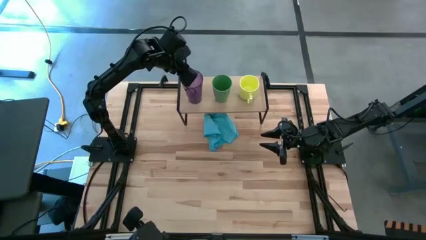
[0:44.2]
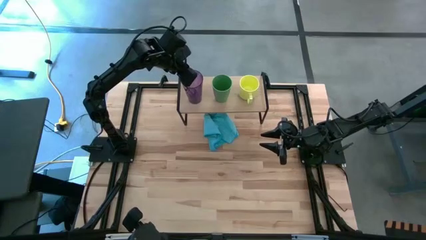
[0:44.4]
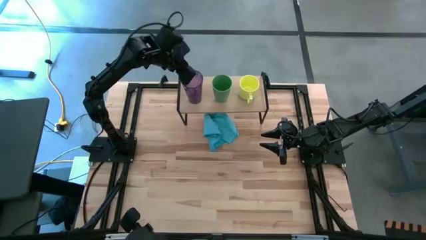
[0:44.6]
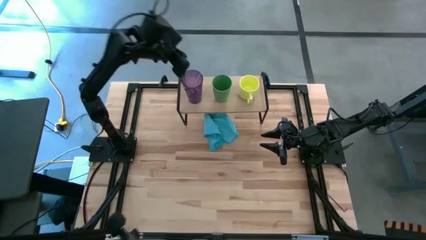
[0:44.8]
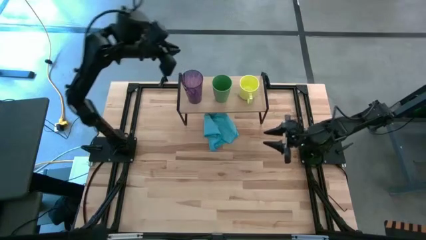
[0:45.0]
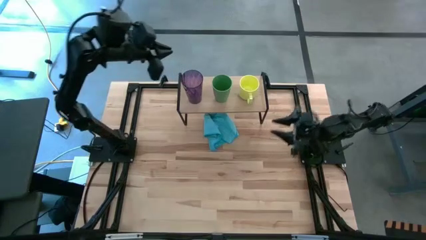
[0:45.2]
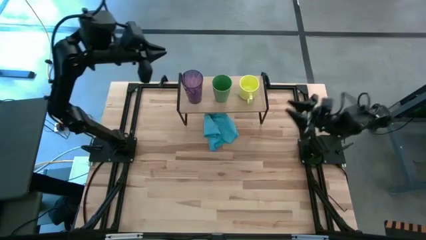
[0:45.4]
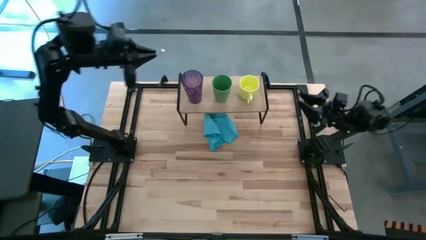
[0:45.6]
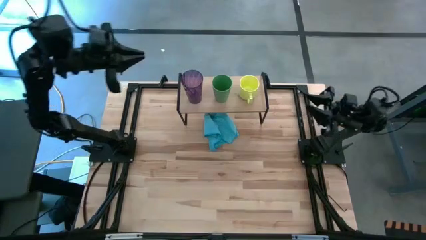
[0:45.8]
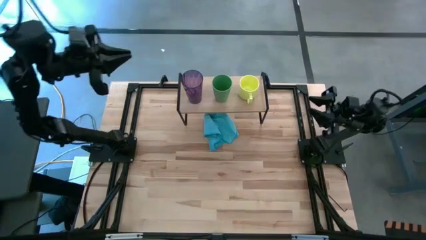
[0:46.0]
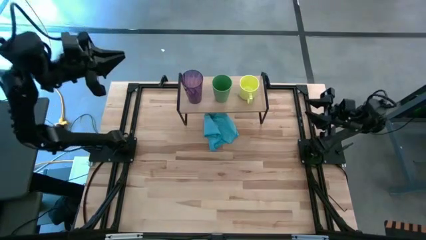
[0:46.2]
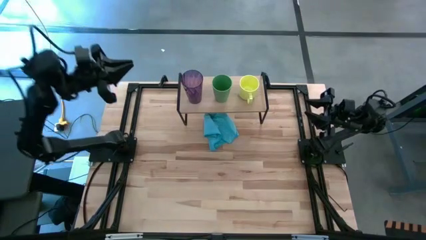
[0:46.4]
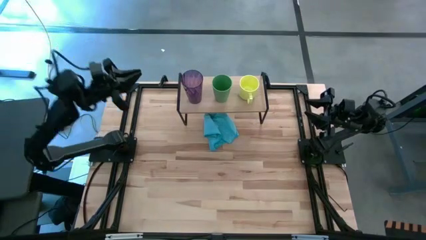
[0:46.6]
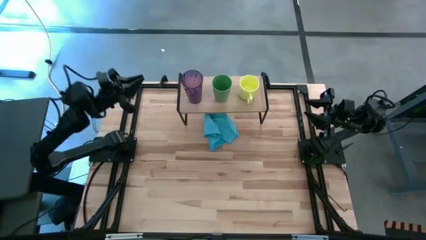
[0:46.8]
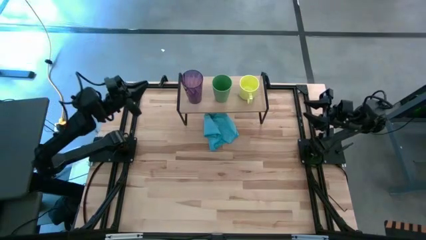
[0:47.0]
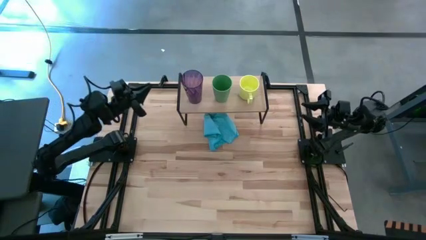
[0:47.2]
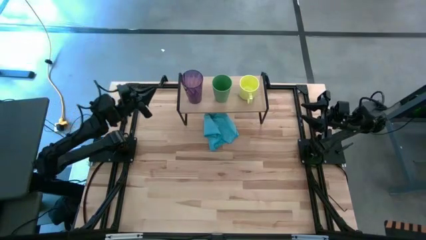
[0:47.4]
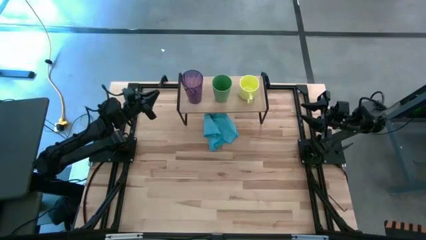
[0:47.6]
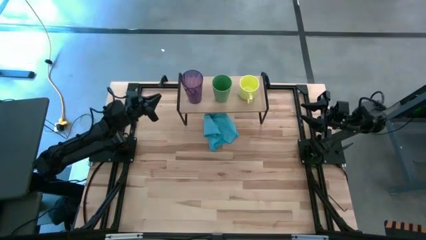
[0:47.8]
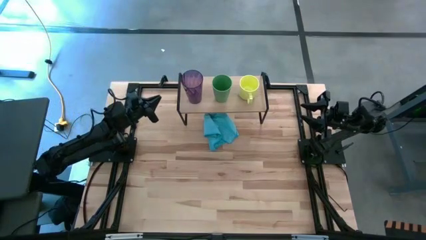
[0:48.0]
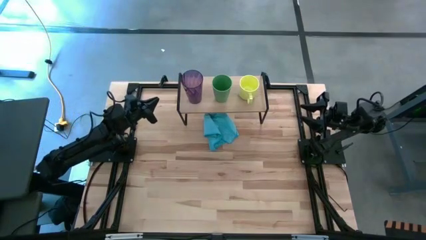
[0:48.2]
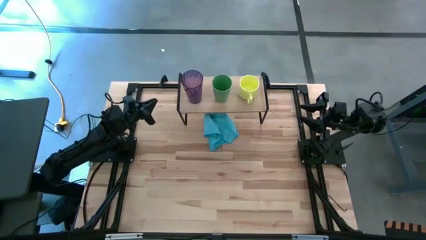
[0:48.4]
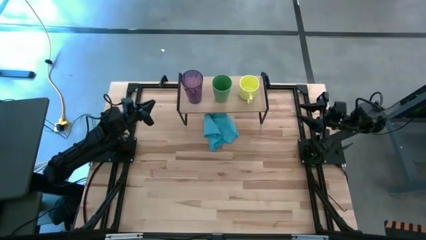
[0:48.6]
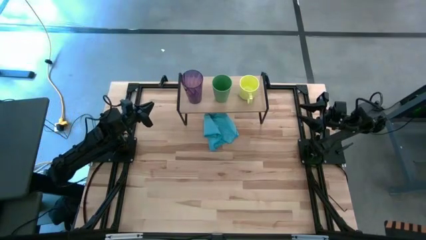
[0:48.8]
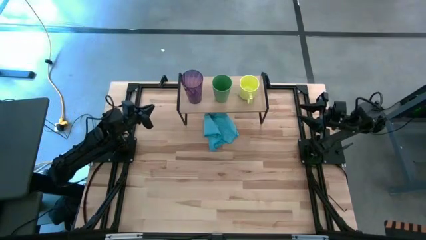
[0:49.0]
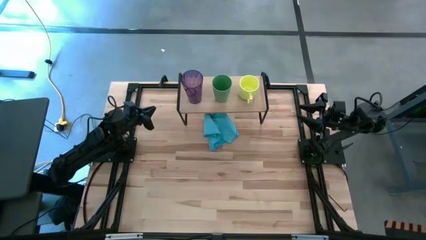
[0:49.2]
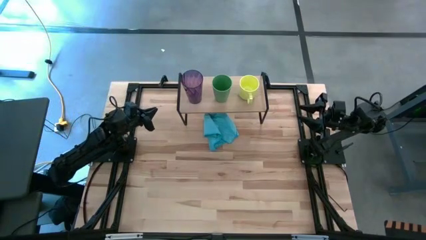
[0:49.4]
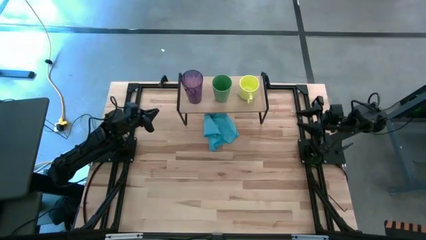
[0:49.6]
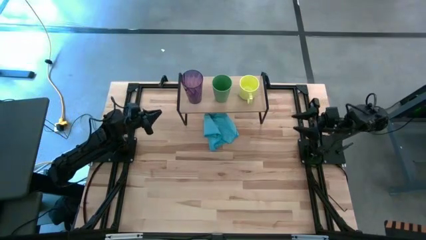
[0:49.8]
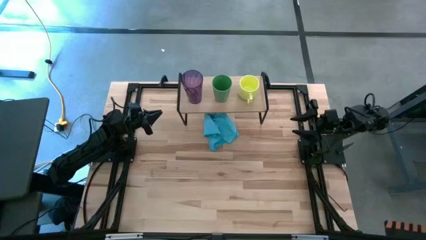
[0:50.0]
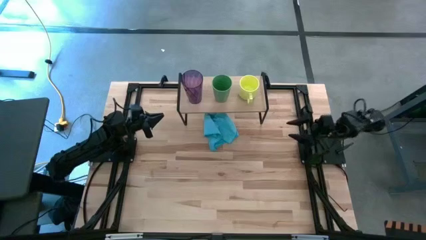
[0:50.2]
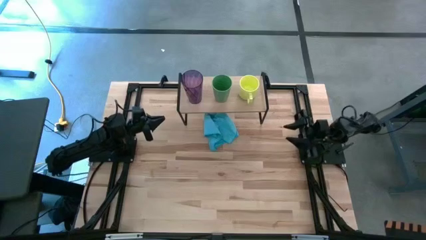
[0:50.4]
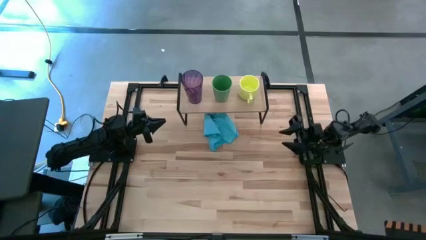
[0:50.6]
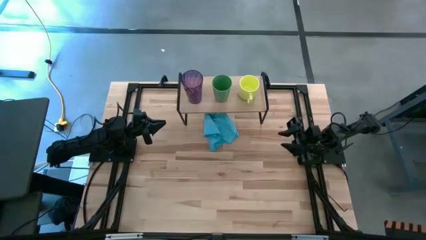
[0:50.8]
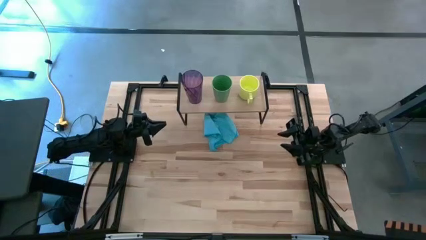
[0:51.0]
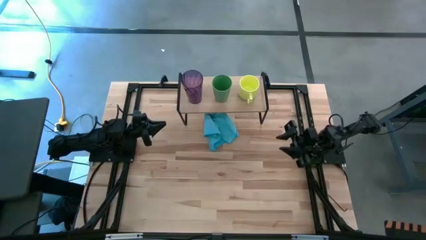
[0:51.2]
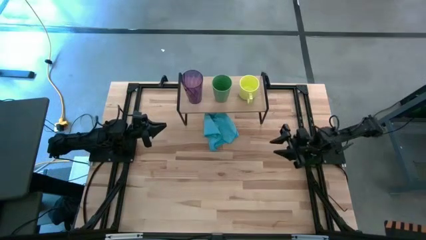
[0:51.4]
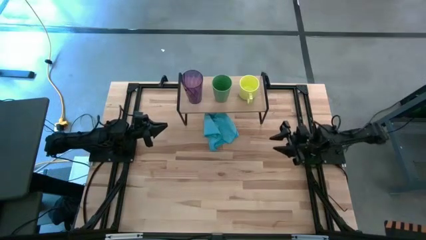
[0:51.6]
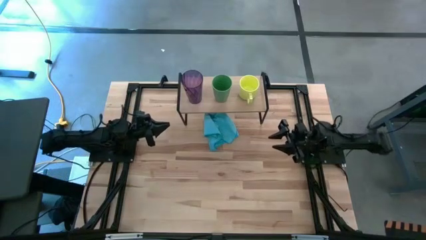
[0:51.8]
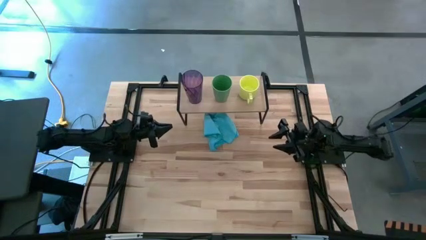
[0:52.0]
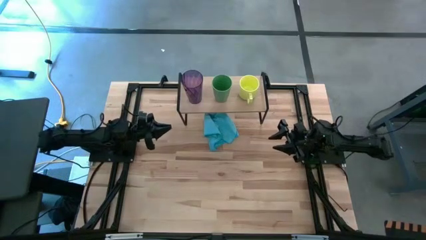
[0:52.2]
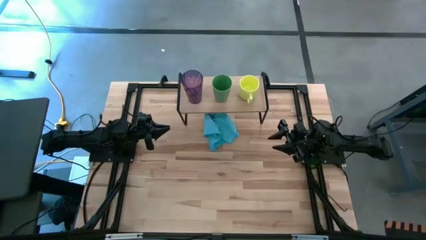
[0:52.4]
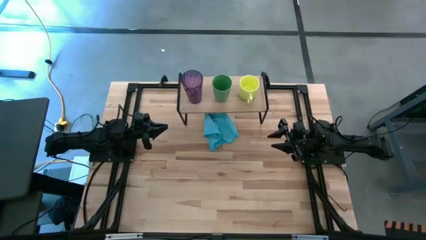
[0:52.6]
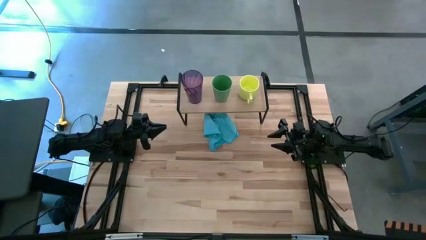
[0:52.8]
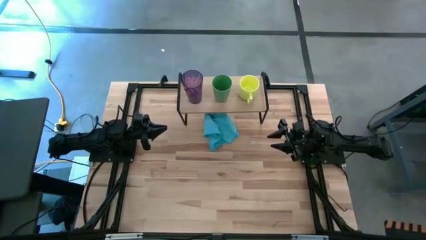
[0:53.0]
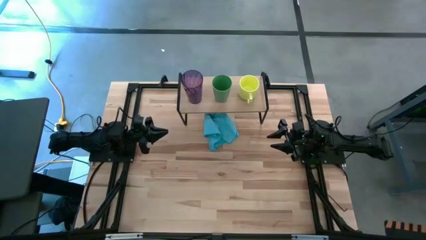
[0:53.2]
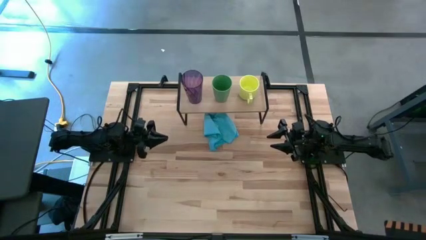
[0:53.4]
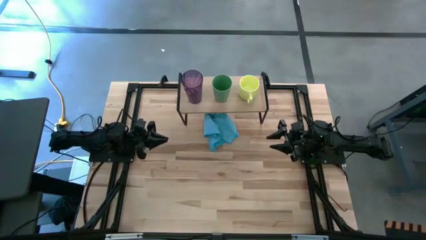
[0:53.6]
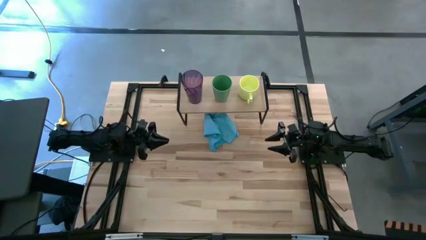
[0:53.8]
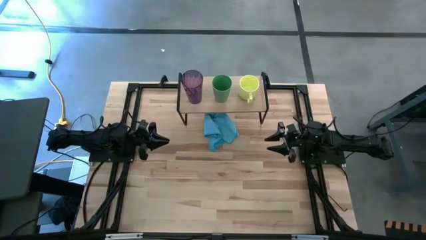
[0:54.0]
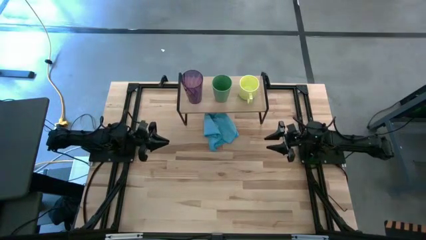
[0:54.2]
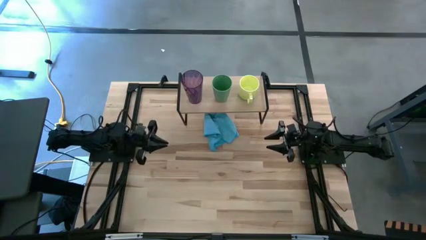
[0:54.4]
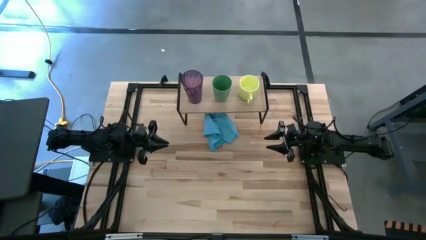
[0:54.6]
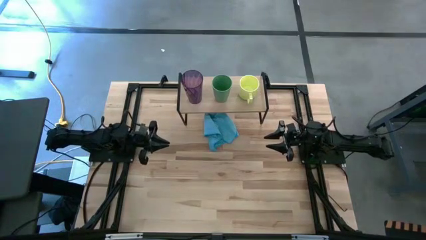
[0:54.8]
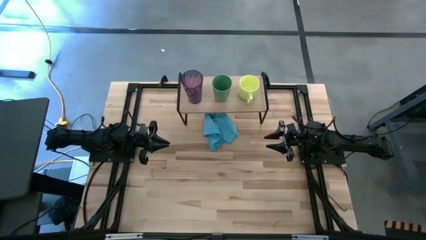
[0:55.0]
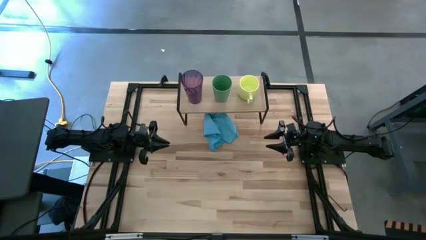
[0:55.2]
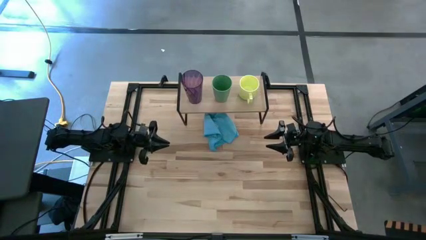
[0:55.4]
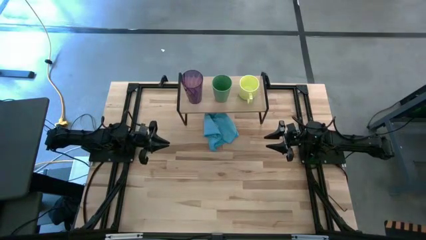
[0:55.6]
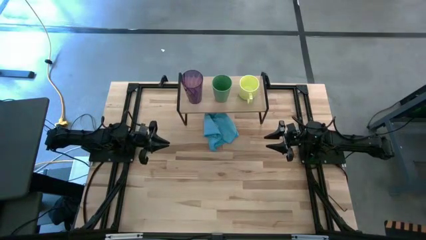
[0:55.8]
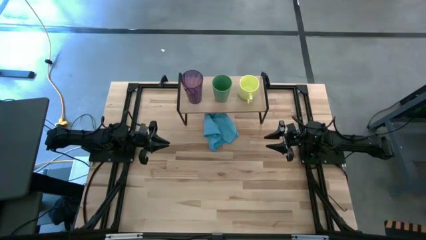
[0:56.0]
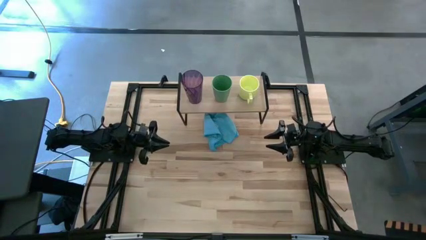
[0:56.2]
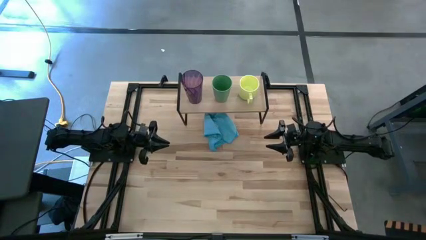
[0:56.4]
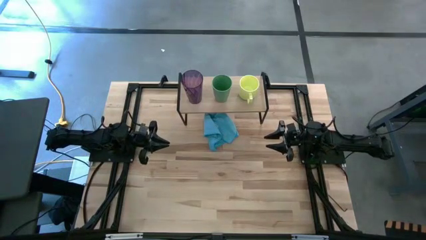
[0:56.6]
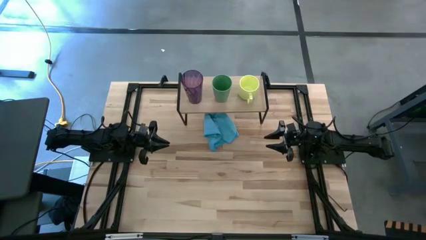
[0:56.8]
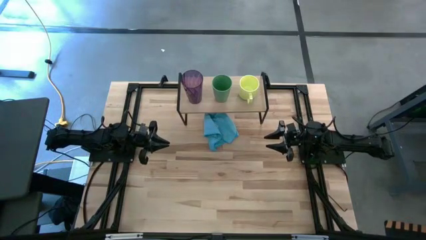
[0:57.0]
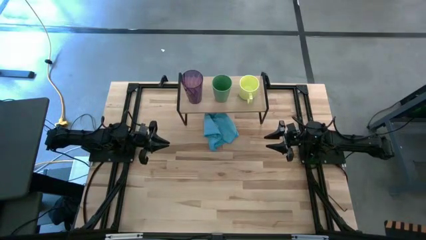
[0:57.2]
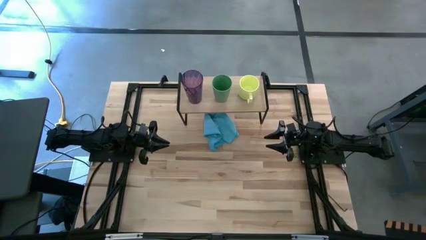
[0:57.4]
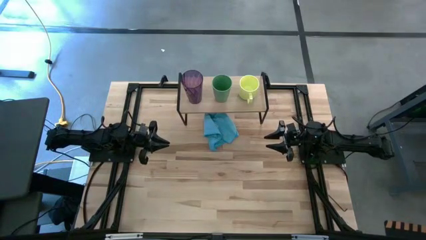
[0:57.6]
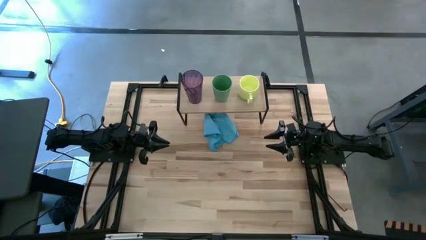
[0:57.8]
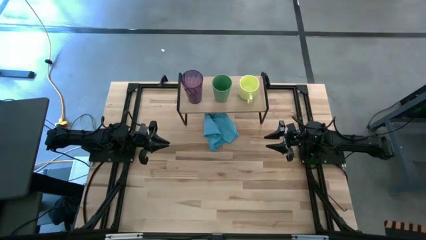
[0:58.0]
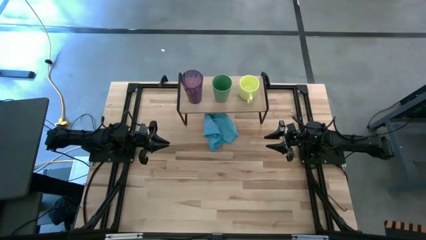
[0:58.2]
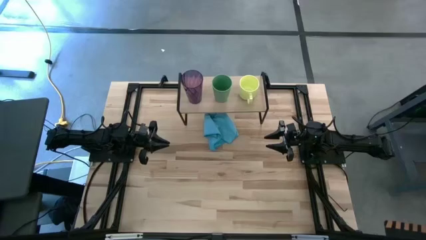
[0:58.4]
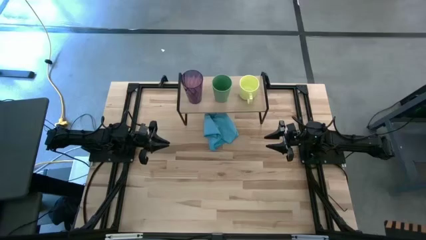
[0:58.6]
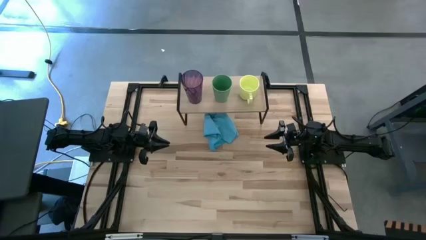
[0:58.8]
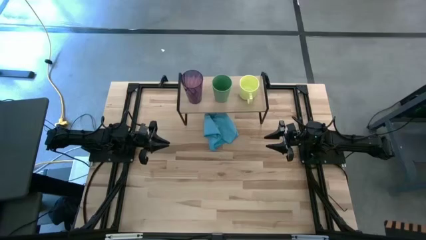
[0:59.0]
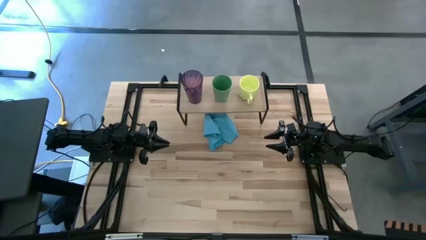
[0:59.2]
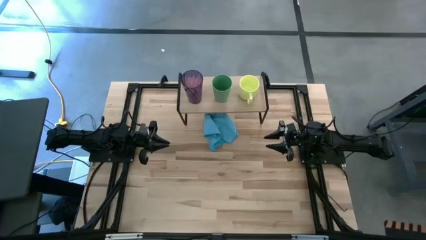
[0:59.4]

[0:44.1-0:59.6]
Task: Stack small to large cups/mugs on shelf
Return to Home Position
